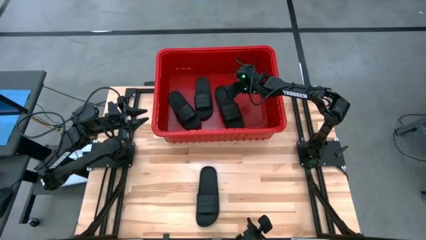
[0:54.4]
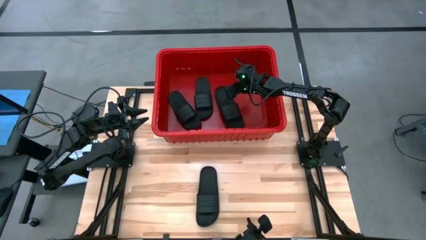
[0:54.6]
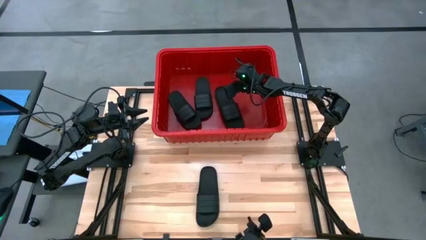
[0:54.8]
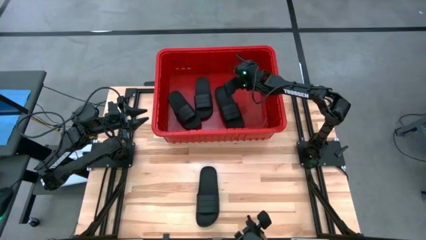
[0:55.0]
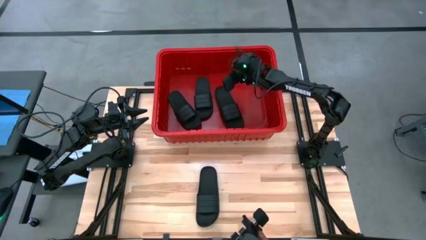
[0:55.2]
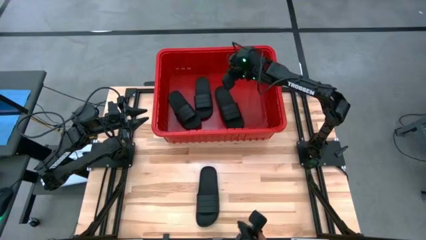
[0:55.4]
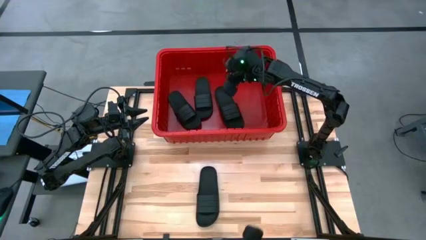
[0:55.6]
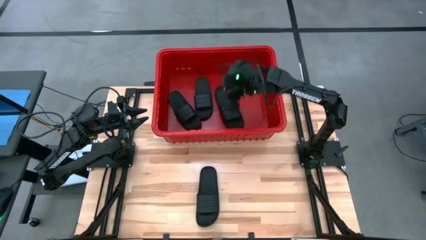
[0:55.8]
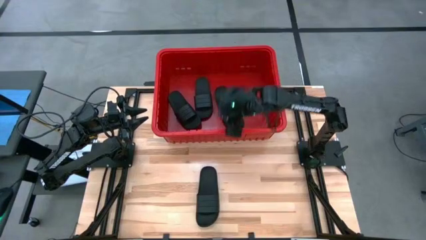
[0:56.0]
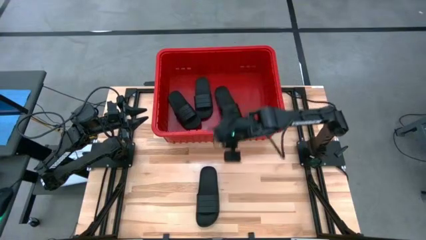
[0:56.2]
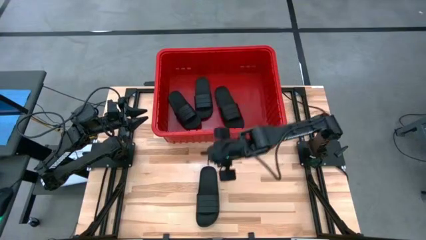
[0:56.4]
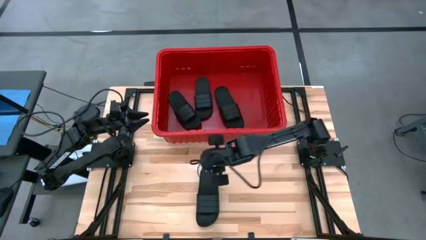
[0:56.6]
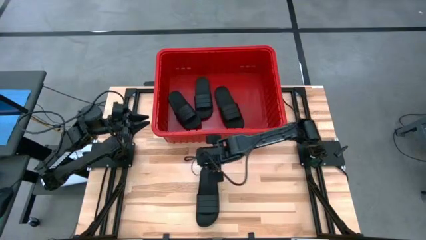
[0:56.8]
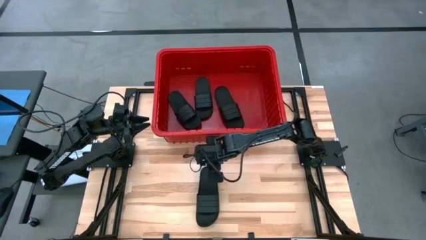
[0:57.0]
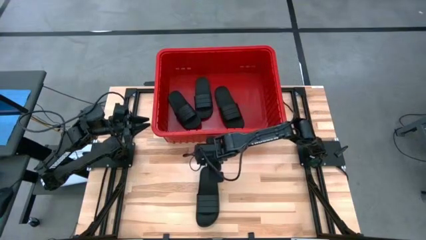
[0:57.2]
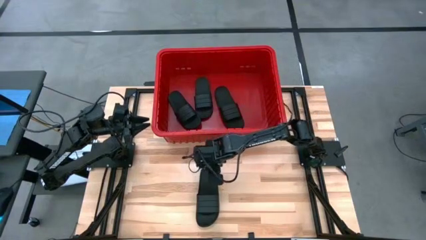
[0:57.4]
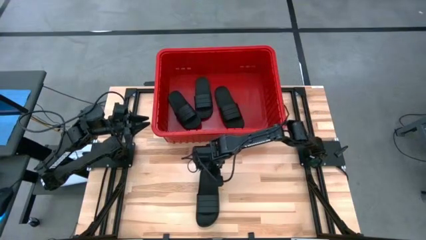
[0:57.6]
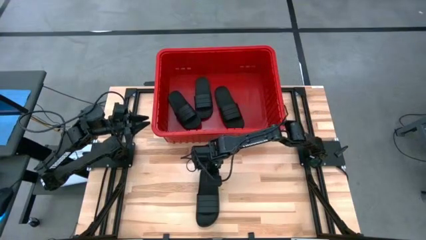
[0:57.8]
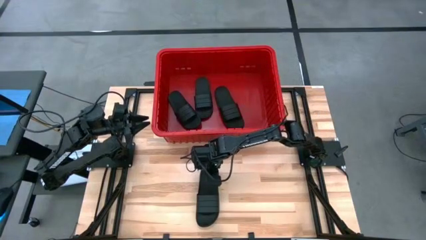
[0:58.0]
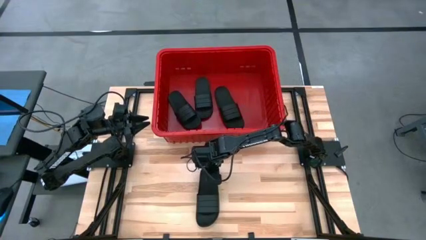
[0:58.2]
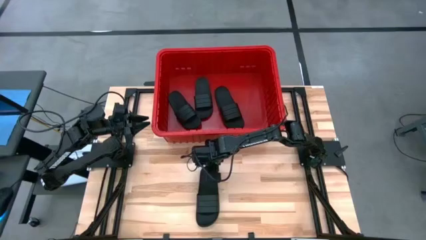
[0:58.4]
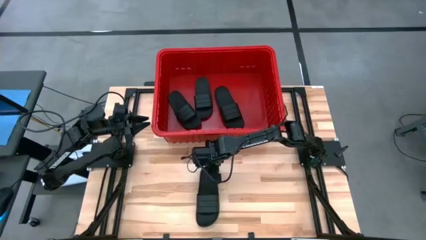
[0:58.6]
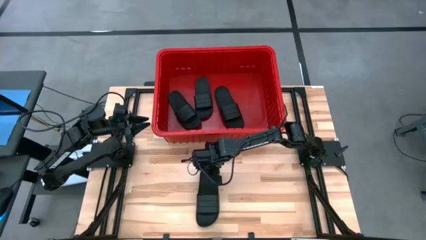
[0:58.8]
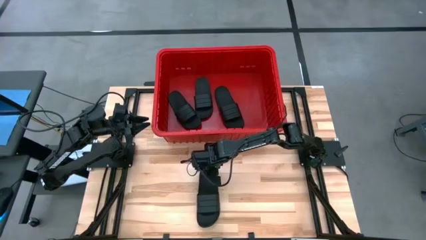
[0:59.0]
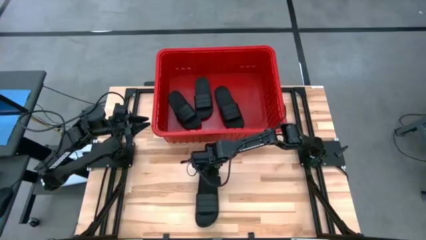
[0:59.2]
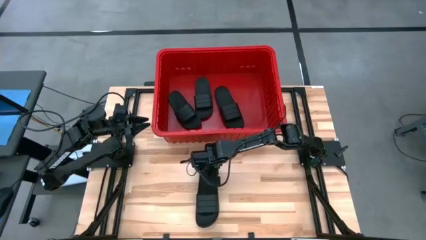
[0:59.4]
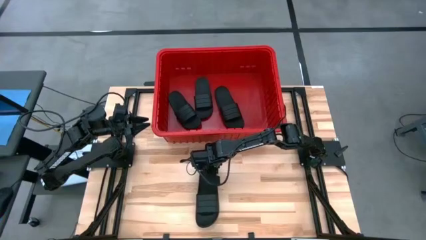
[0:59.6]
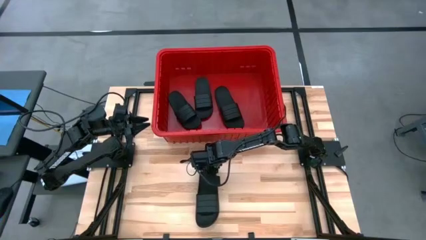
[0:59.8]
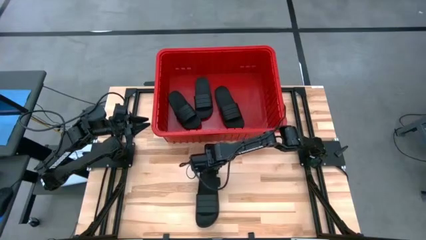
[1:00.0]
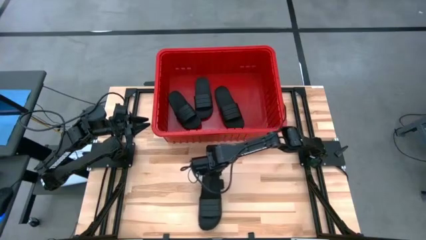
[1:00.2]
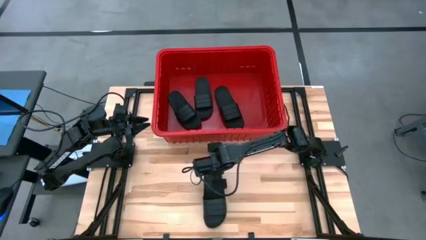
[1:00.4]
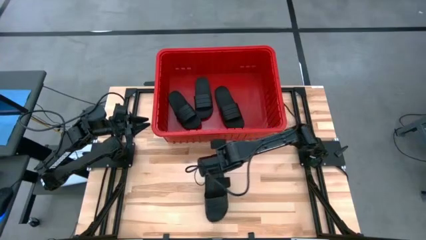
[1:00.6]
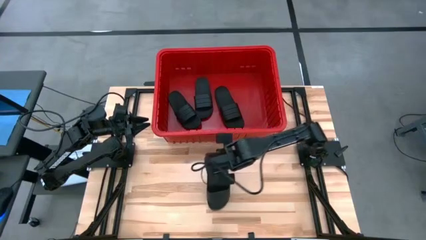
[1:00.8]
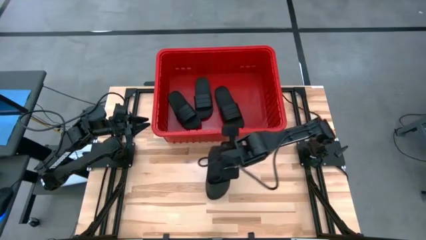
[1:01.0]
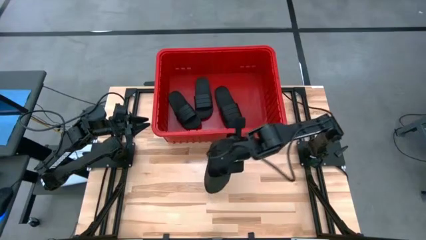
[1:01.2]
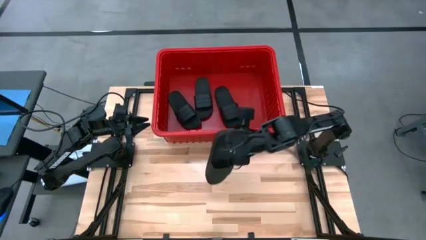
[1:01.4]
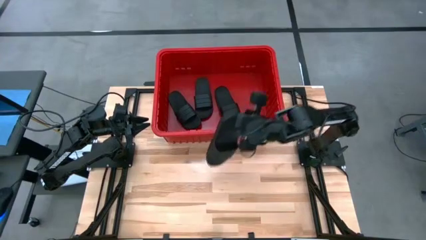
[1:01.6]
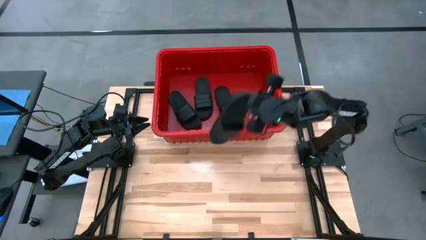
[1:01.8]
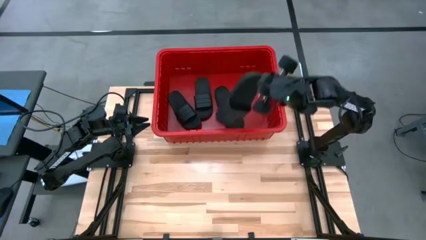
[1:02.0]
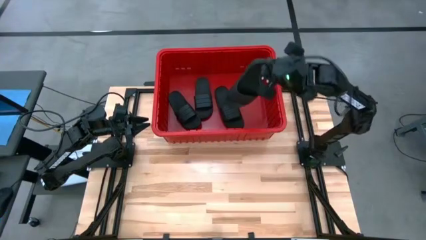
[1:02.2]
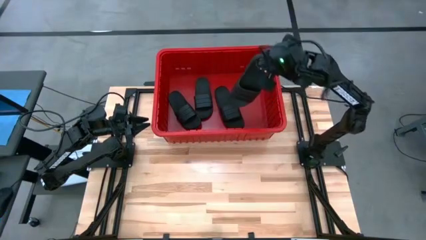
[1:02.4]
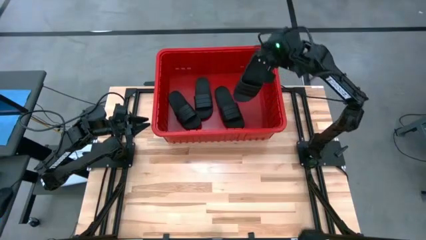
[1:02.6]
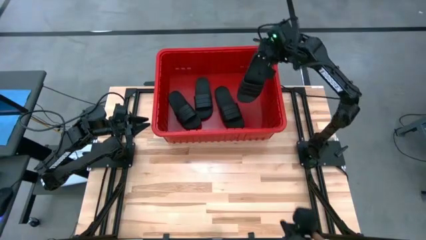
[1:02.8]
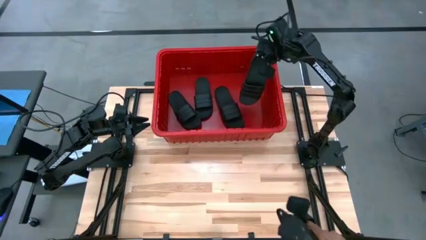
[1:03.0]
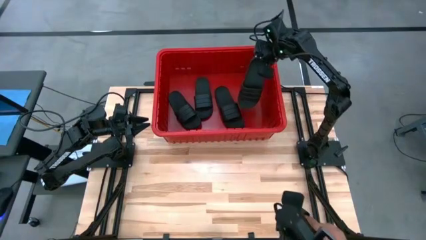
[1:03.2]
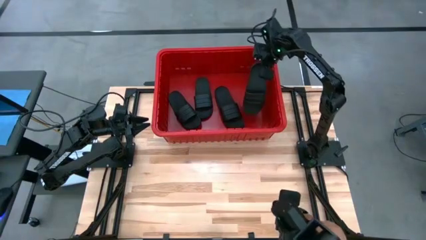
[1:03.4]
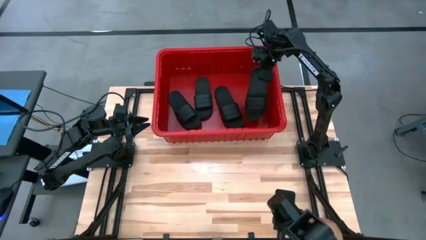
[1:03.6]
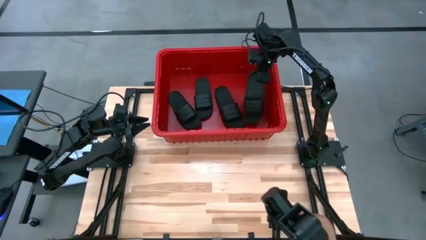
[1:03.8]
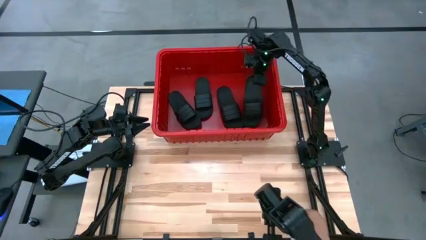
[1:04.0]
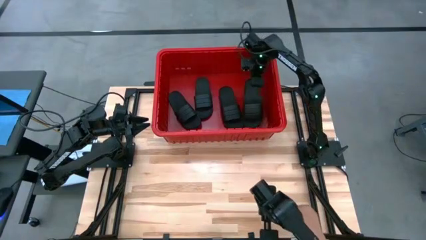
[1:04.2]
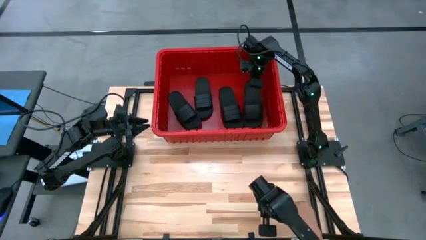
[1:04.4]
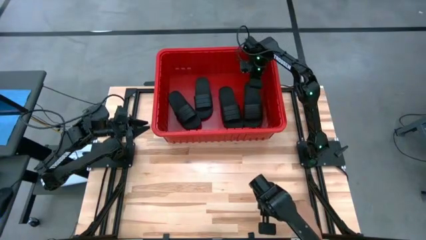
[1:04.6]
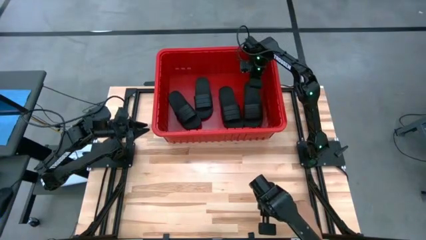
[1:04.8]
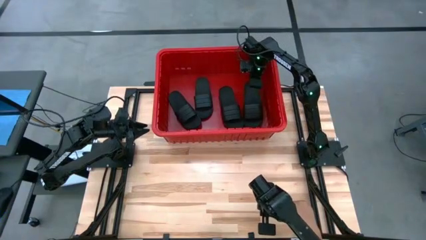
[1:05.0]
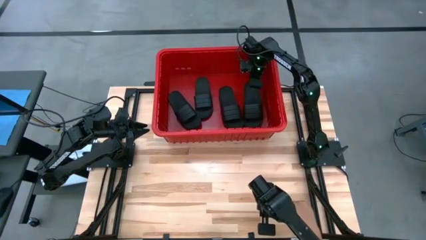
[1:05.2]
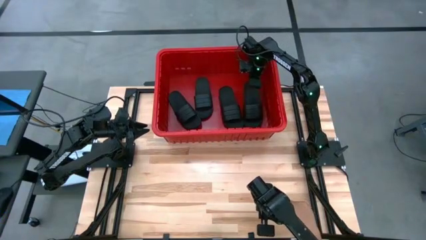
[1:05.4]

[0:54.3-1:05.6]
Task: Pick and place slides into bin
Put the black slide into the red container
